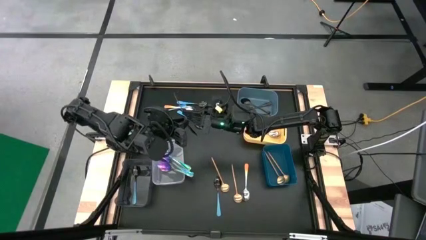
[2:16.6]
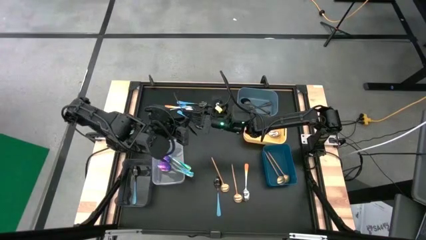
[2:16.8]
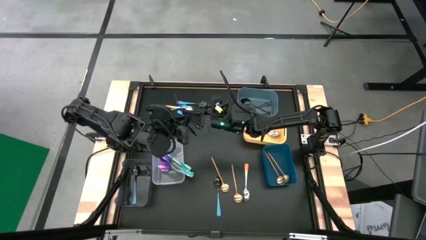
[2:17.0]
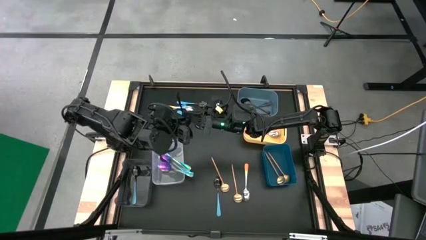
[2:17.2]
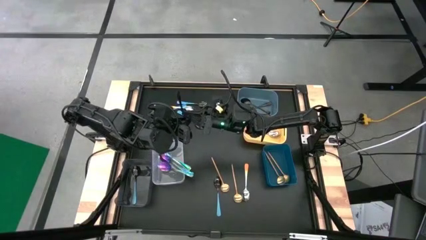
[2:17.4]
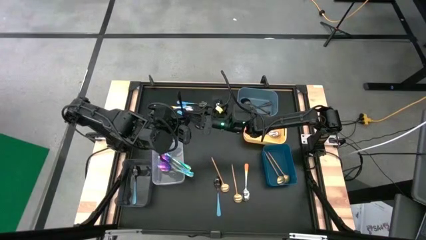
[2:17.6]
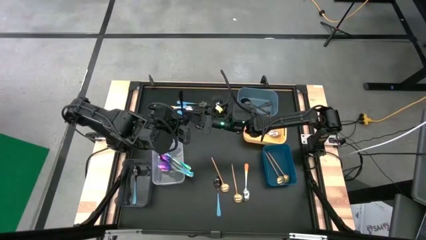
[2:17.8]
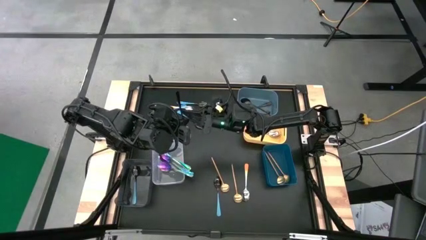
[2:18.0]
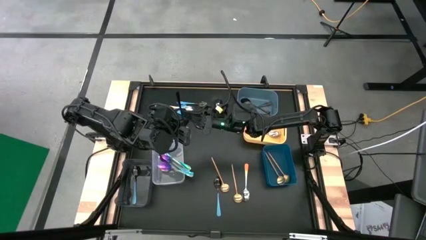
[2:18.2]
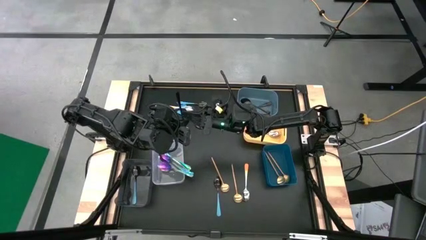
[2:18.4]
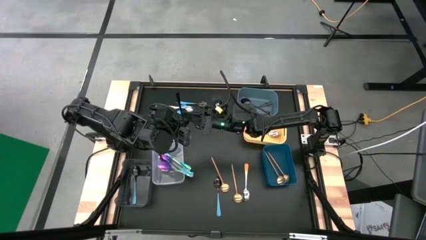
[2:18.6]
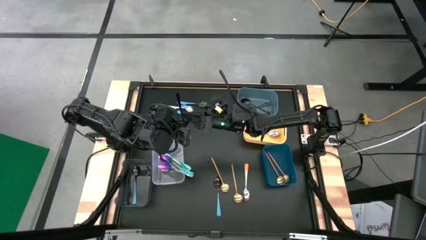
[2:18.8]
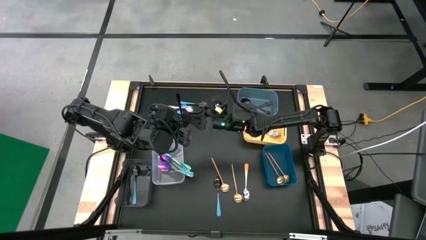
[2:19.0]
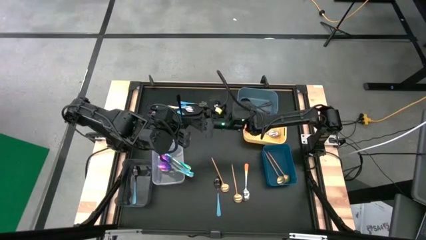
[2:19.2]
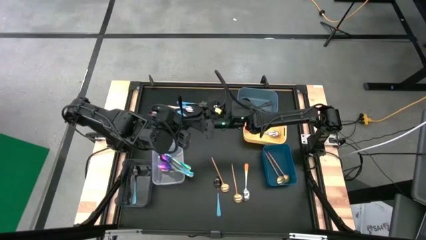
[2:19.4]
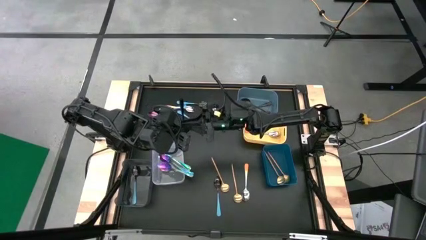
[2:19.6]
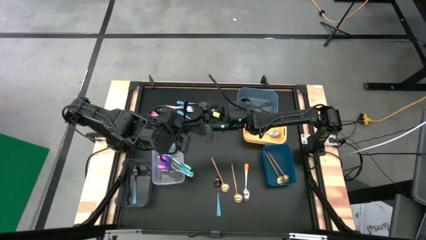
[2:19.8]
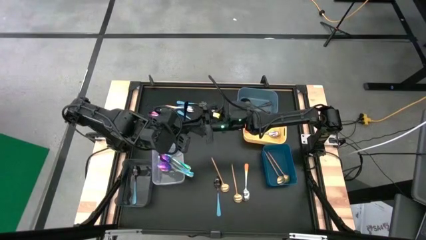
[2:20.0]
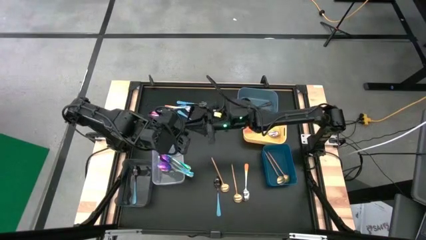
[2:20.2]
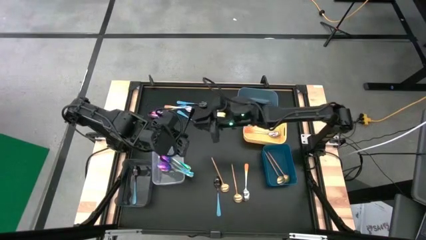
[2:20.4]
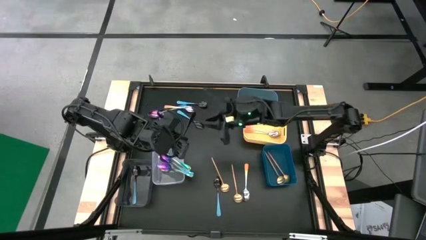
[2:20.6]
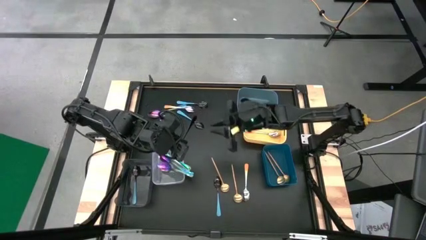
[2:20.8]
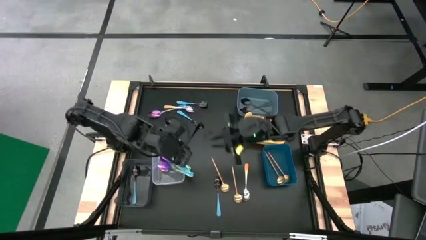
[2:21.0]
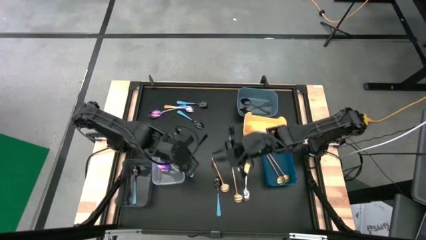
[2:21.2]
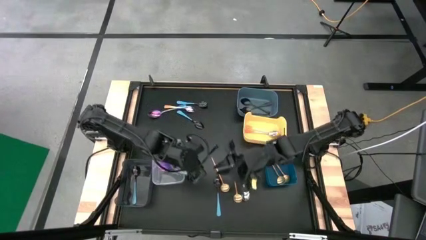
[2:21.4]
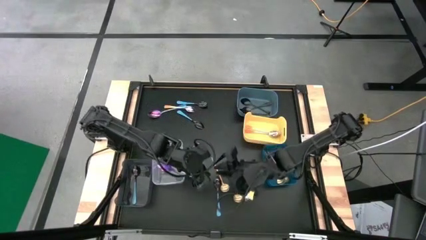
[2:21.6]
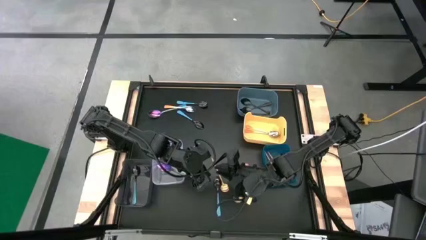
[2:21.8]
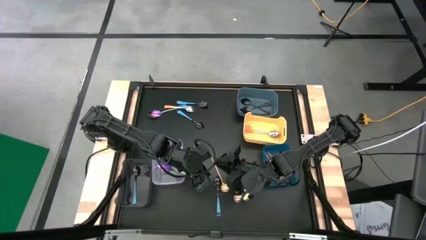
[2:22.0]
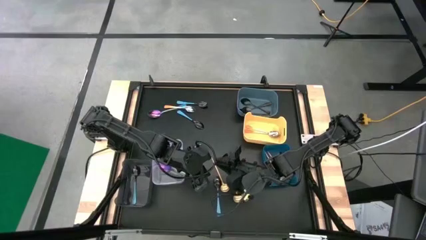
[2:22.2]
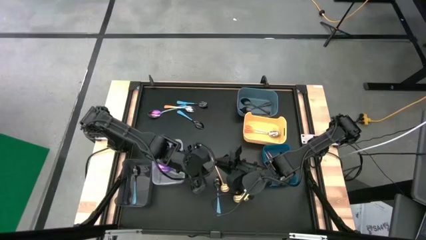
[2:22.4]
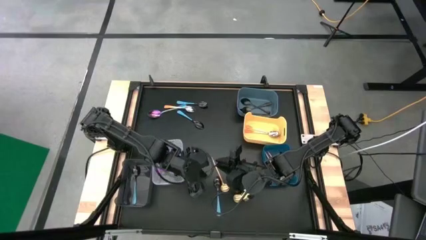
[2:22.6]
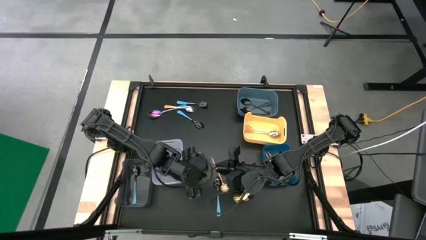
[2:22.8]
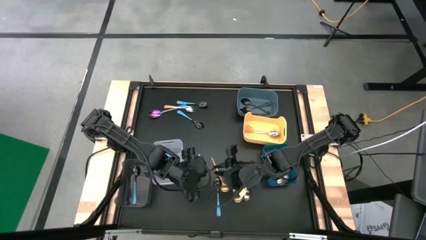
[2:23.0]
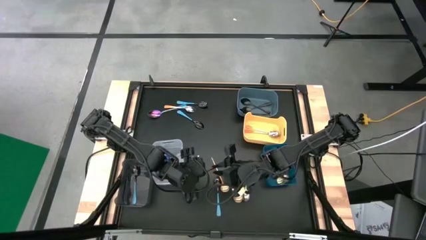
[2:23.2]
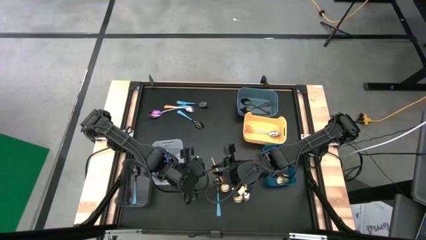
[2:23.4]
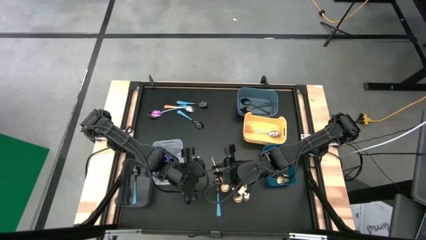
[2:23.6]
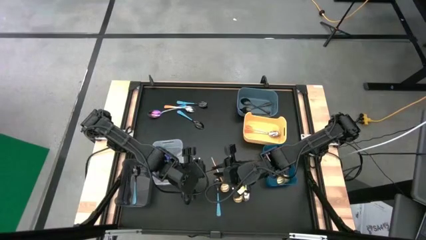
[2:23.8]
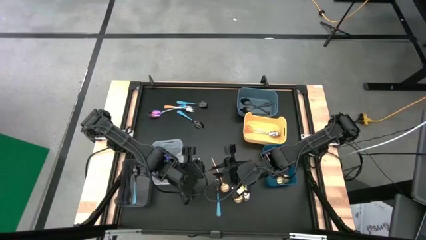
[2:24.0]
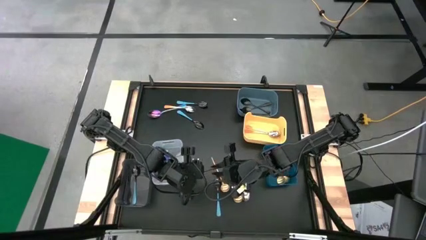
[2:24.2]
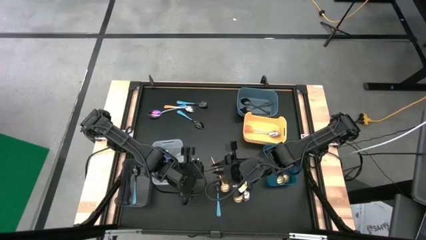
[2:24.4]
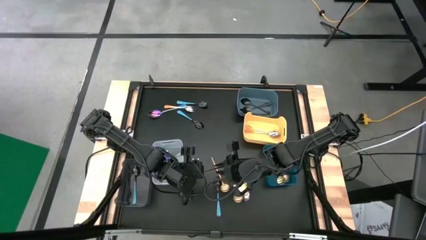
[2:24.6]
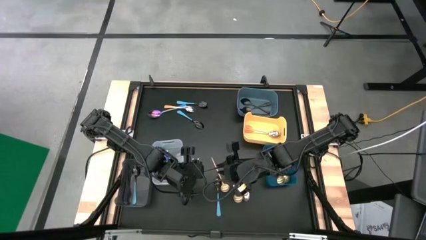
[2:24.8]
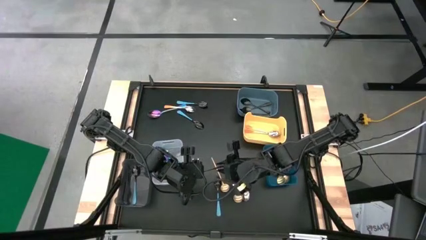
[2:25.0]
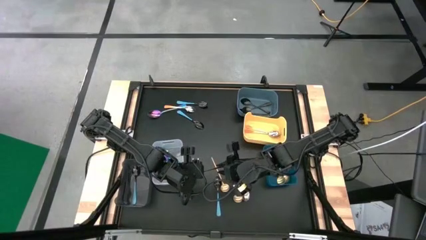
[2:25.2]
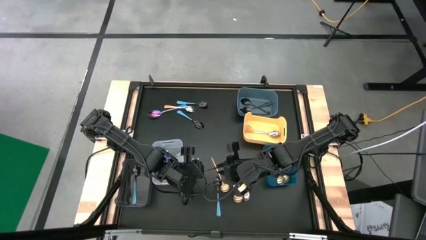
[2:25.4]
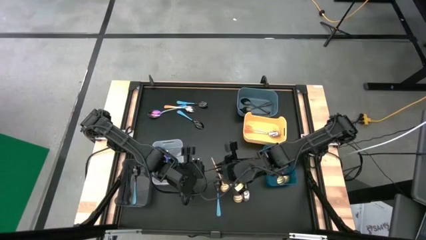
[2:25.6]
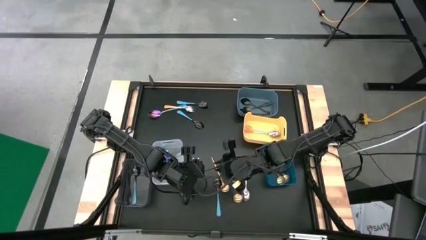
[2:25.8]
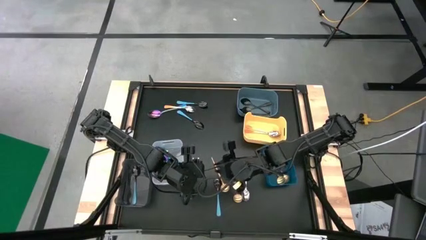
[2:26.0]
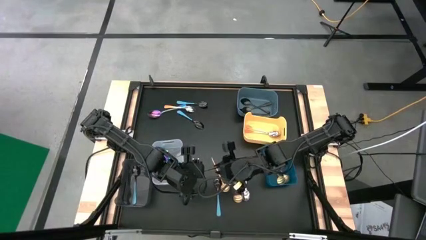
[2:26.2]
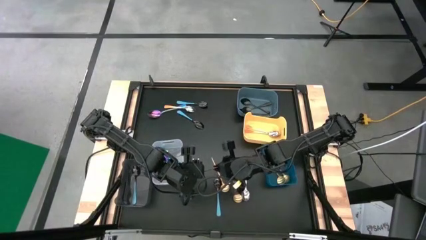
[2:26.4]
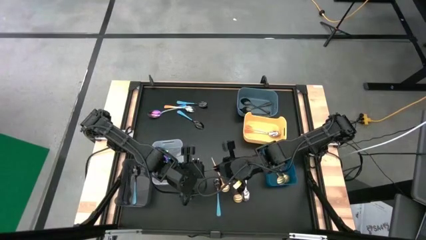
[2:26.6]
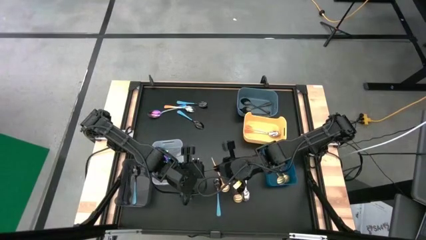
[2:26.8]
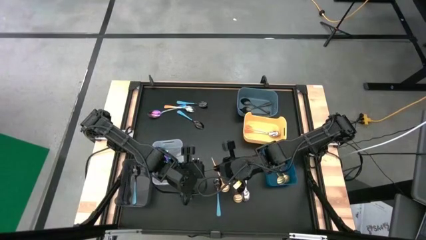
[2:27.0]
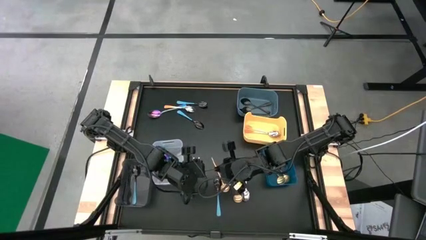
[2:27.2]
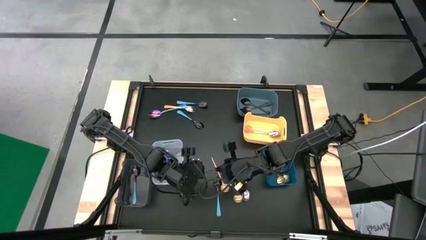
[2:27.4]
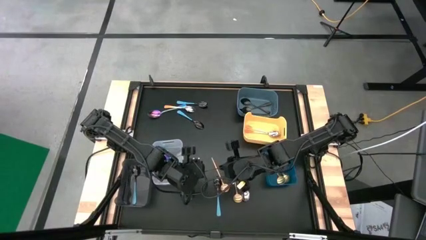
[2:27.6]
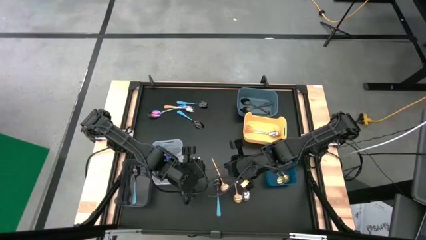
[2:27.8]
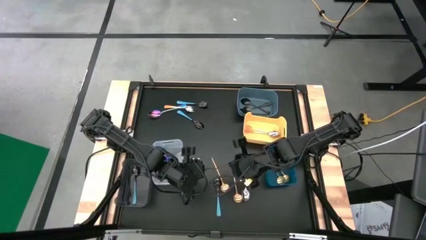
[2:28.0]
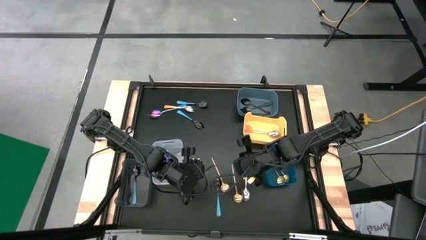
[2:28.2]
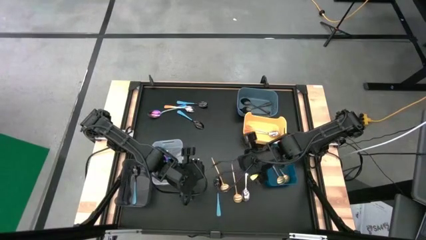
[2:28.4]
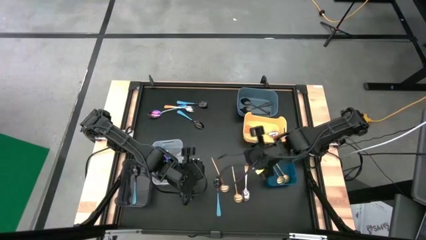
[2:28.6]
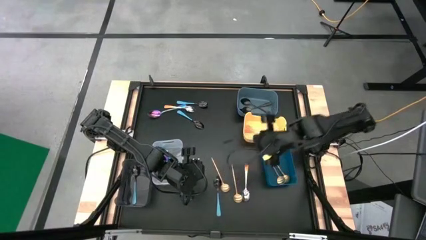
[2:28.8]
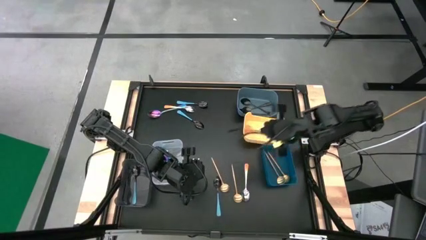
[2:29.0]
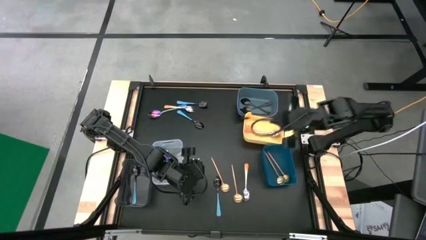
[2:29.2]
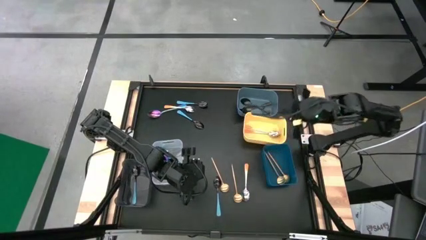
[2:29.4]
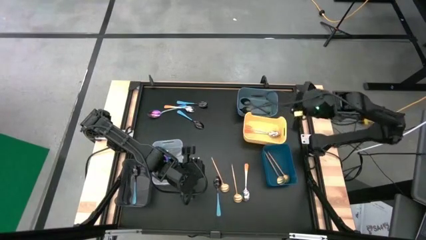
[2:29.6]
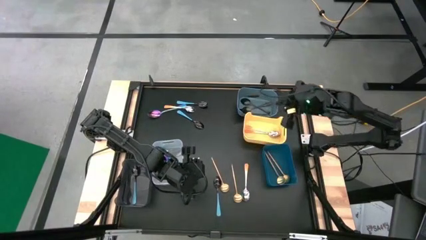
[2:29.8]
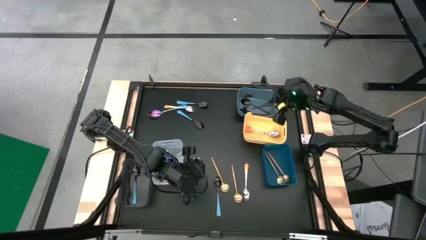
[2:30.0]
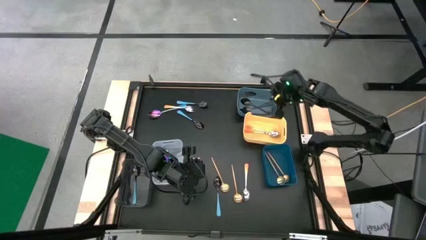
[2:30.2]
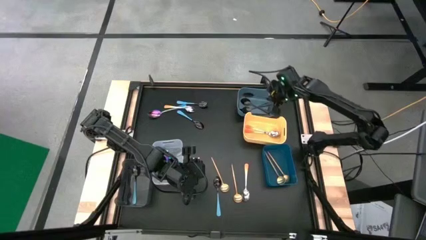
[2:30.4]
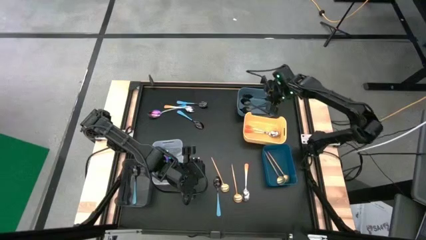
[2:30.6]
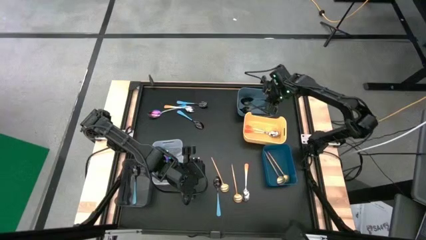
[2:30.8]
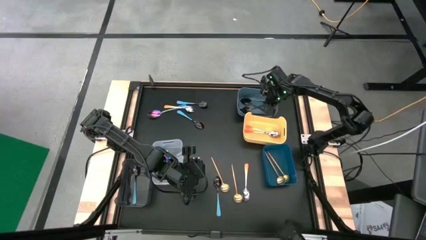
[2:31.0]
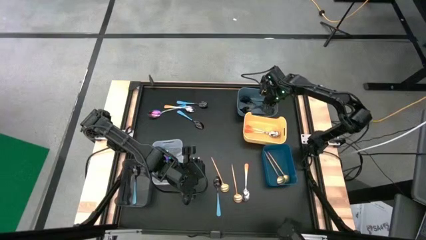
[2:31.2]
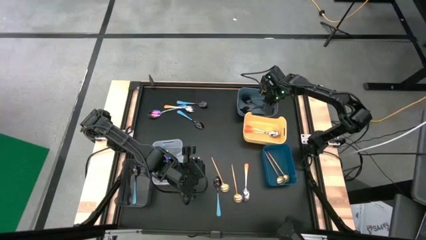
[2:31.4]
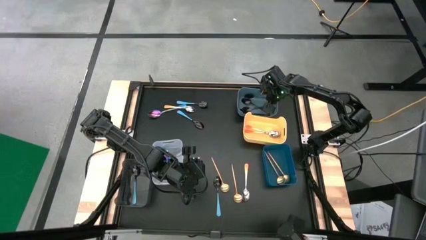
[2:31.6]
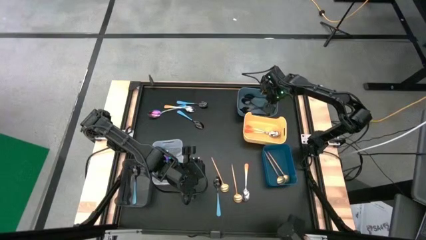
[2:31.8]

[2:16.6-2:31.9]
Task: Sort silverware by color (type)
Put the black spoon into the light blue bin
